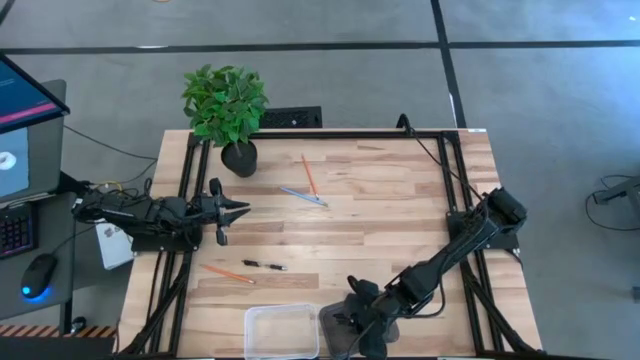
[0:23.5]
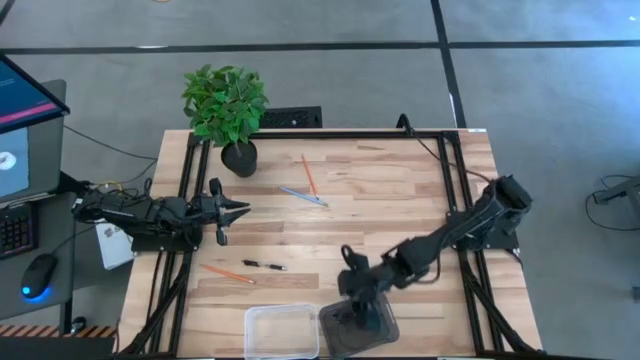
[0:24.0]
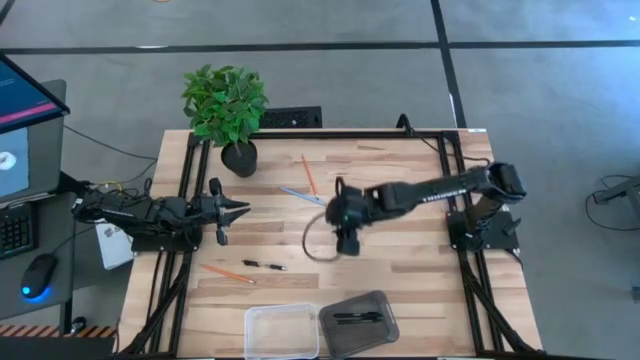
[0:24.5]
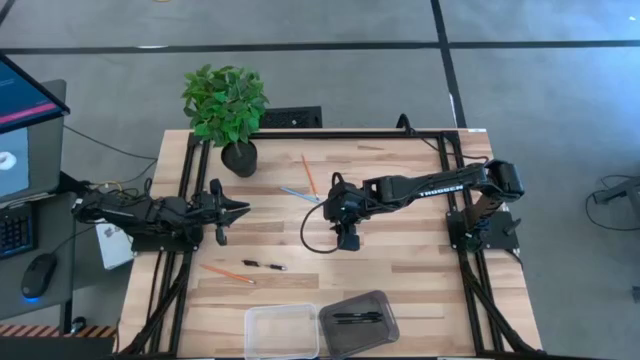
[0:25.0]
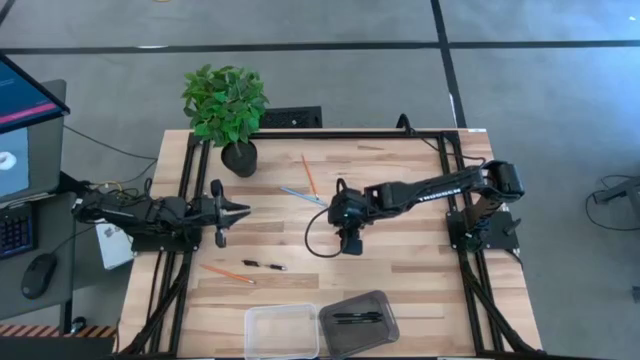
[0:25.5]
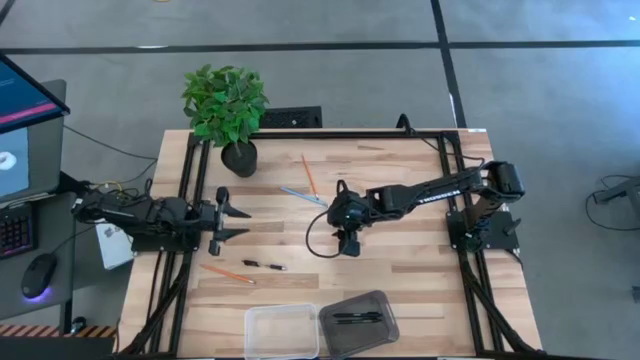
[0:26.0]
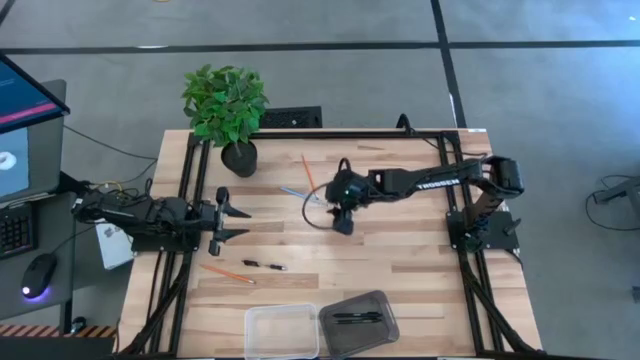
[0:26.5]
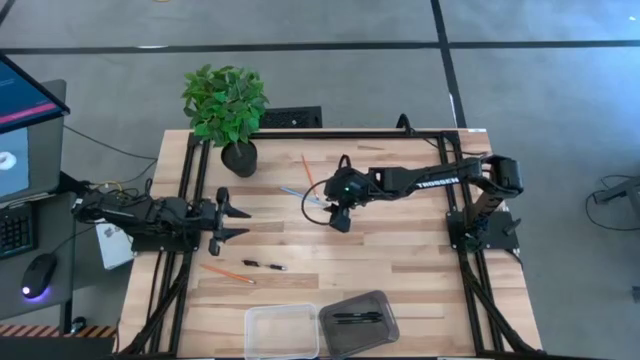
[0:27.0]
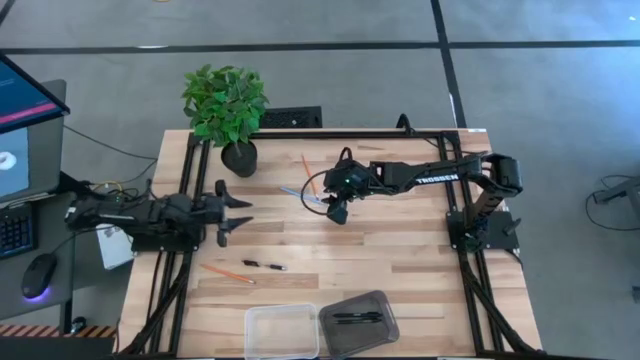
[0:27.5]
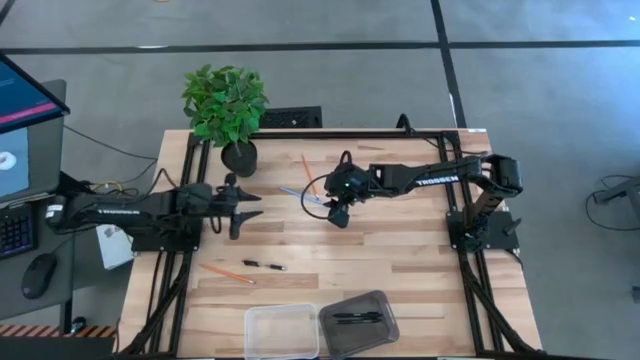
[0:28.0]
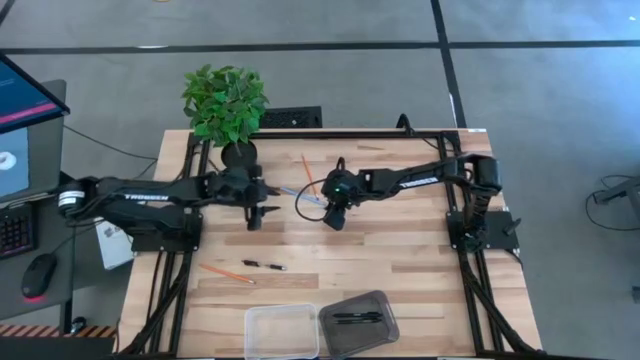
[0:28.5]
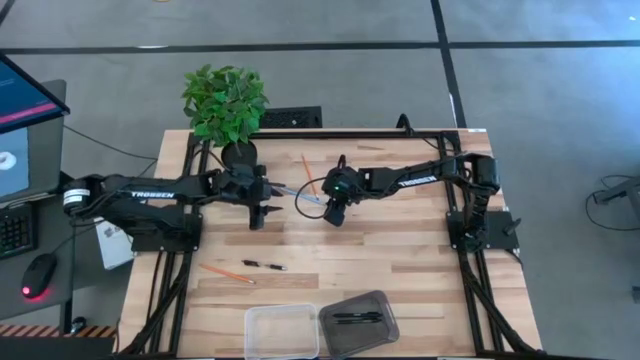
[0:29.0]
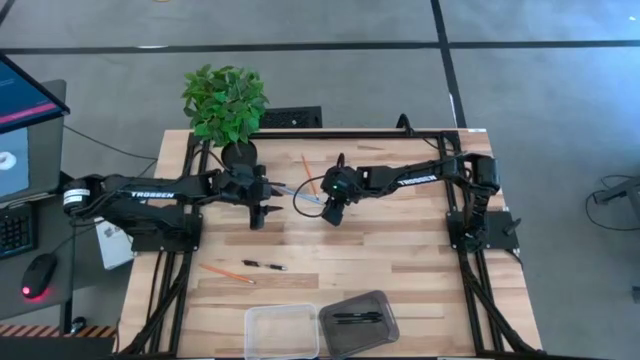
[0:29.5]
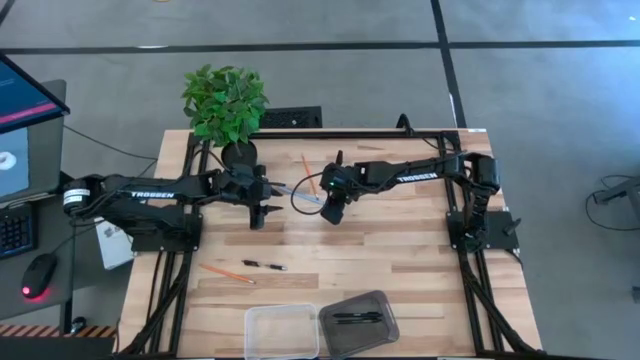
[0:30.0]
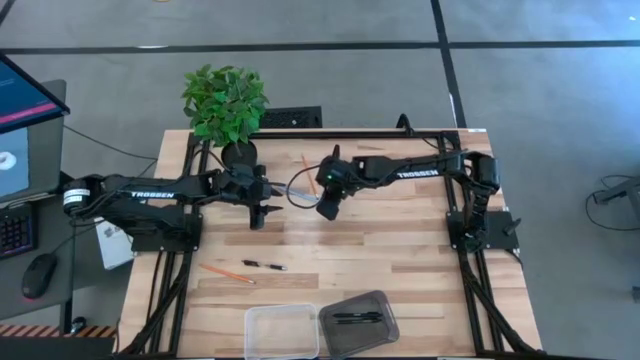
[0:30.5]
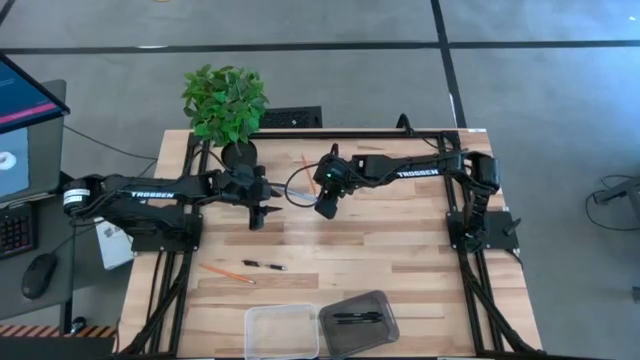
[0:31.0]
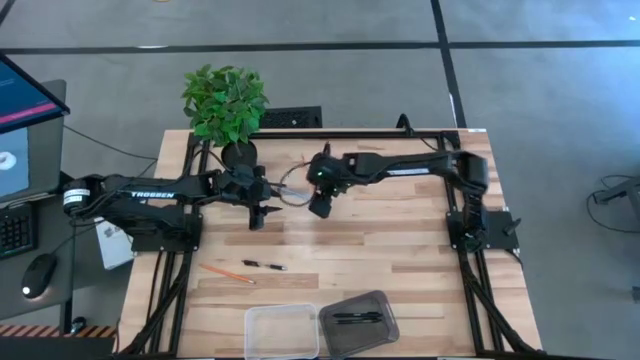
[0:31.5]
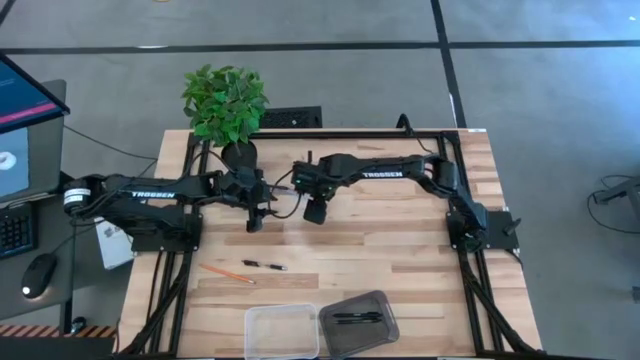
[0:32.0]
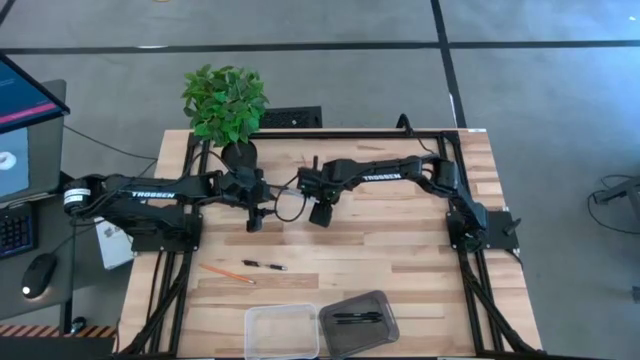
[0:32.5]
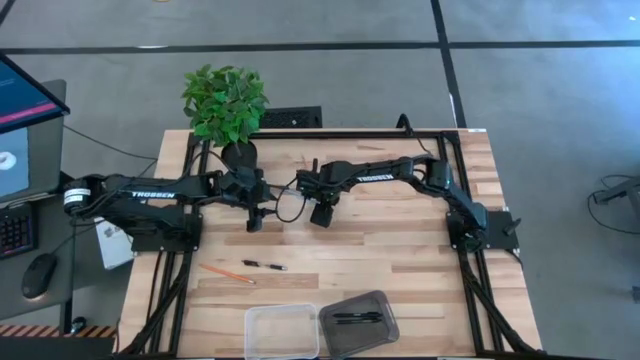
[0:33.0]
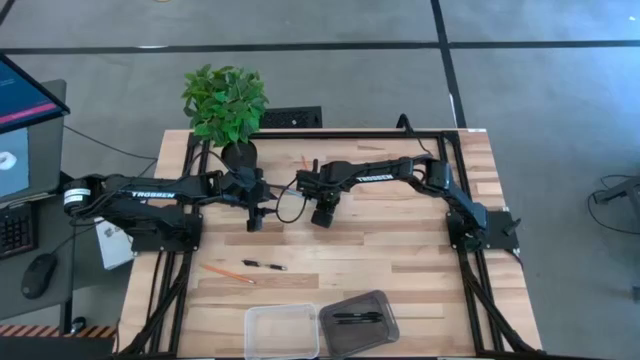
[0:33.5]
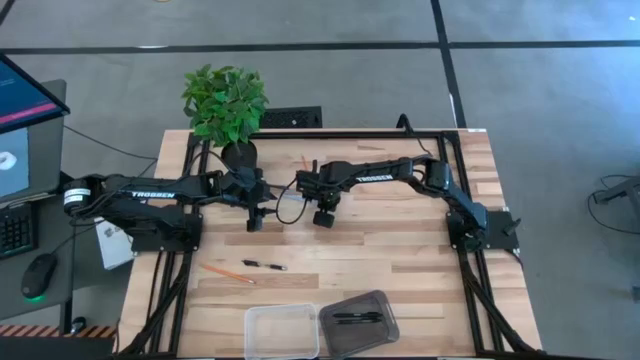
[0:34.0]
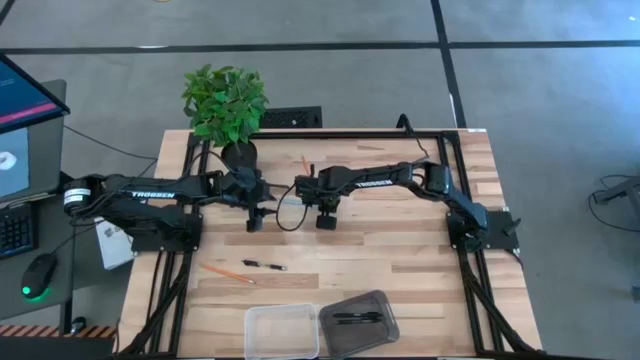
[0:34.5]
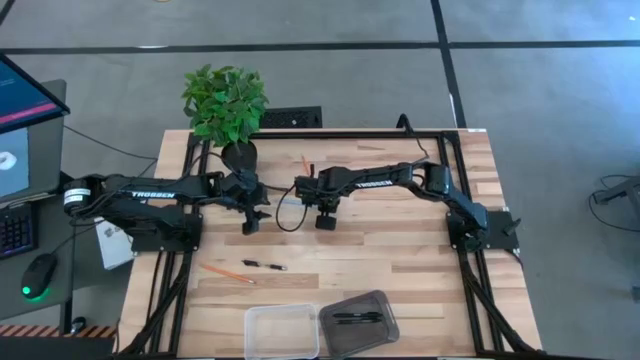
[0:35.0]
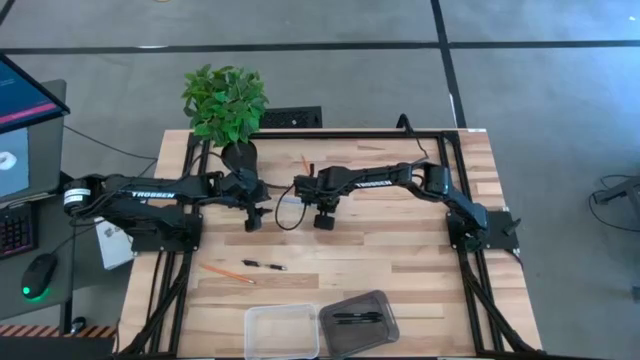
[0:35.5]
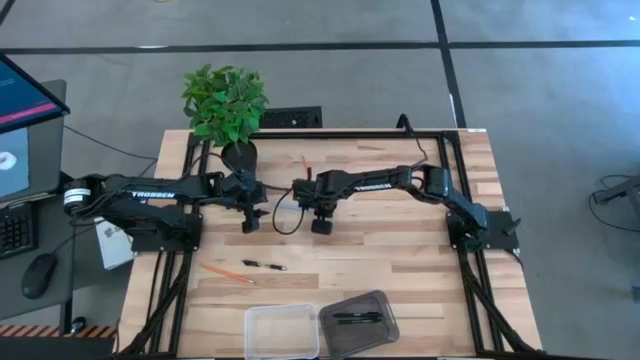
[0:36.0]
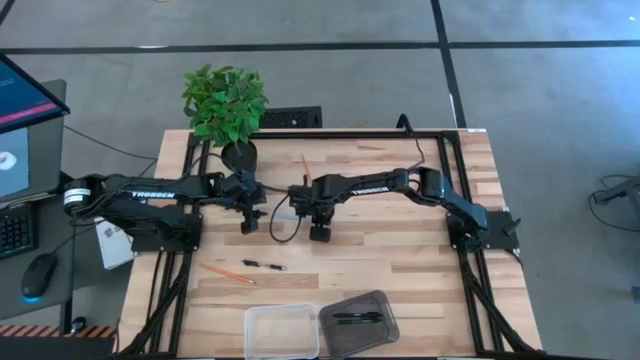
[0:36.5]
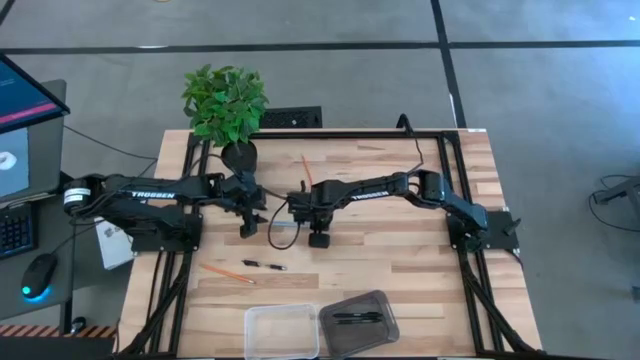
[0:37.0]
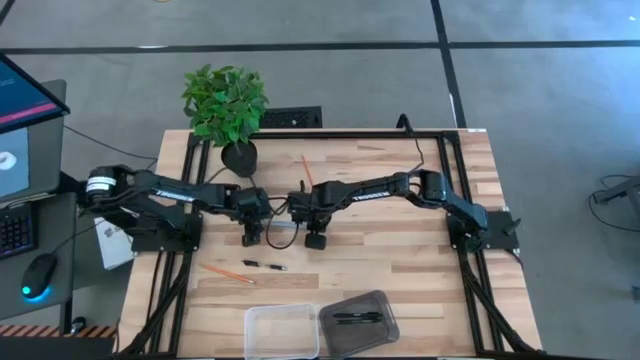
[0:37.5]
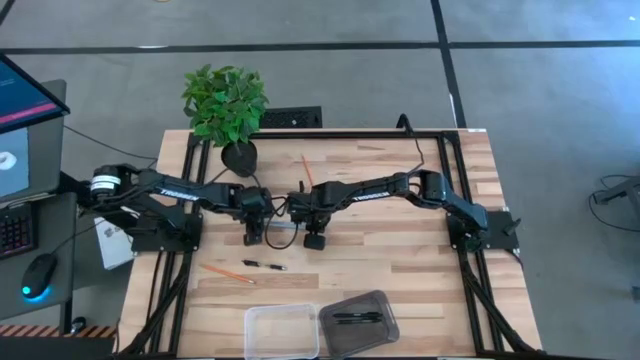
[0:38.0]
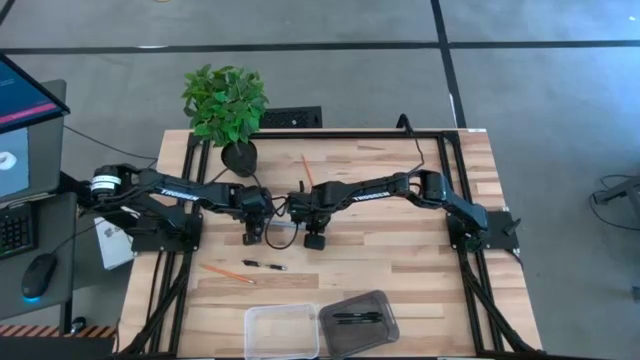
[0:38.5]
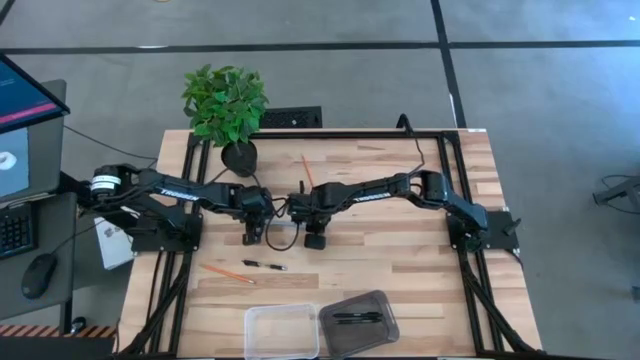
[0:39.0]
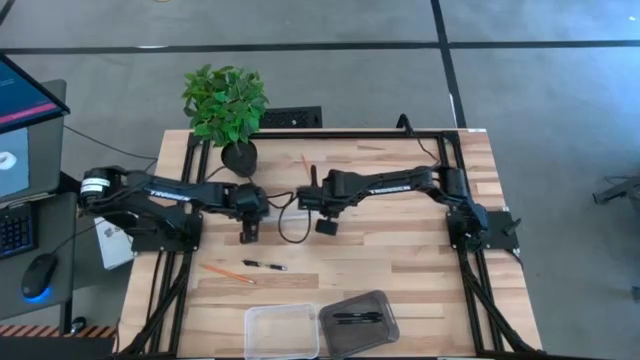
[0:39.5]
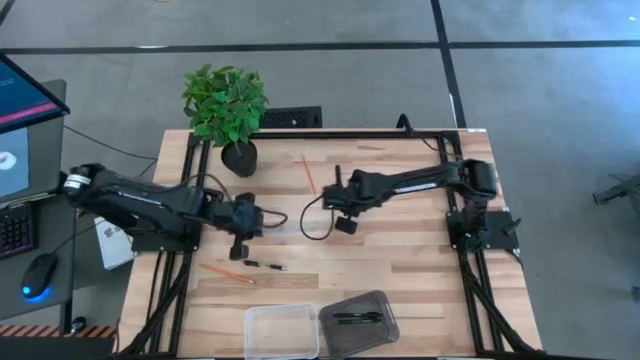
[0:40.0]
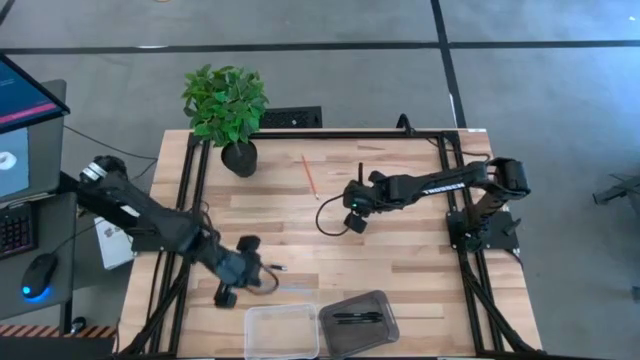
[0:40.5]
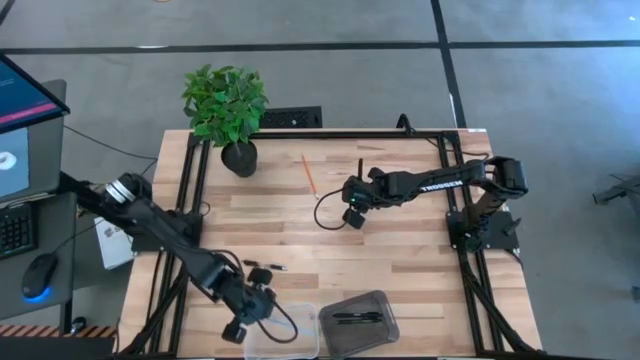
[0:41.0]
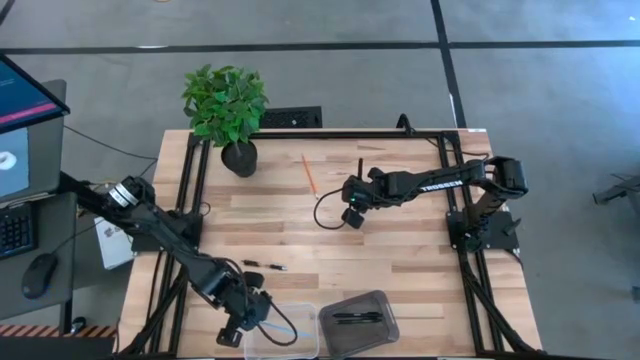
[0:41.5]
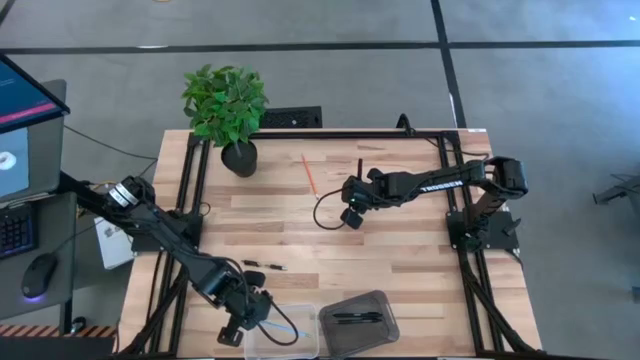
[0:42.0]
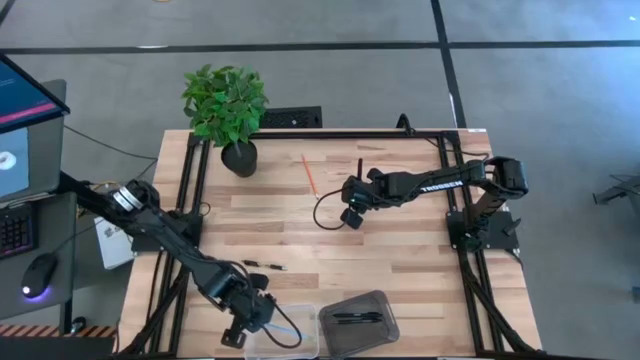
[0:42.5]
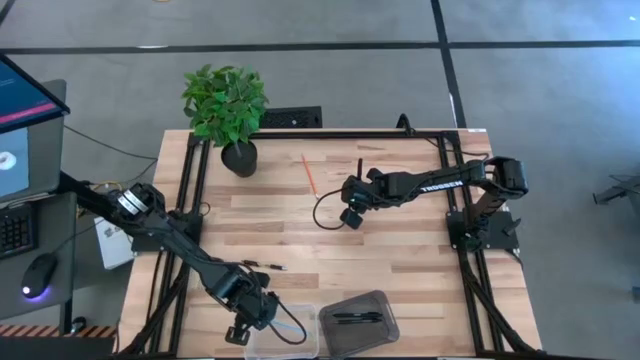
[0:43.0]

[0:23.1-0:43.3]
Task: Sort pens & pencils
Put the light blue pencil into the transparent bin
